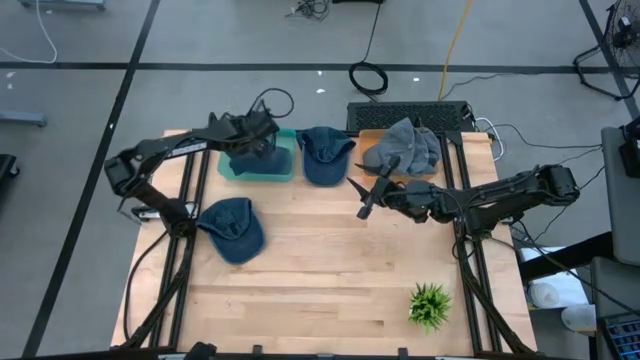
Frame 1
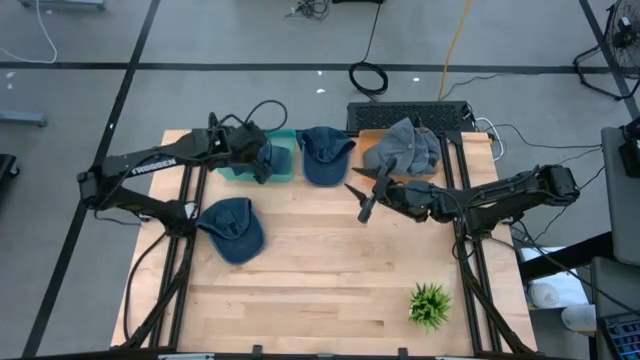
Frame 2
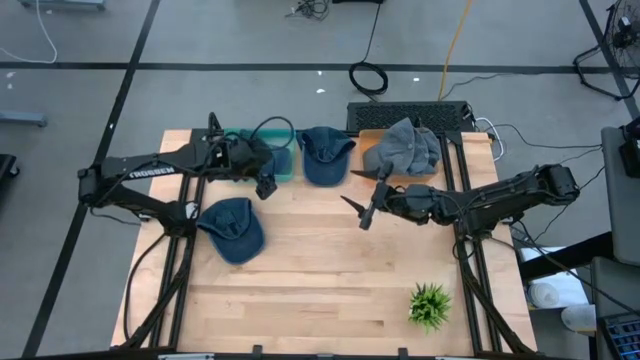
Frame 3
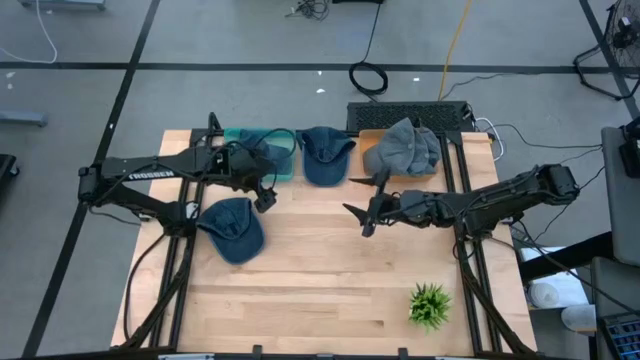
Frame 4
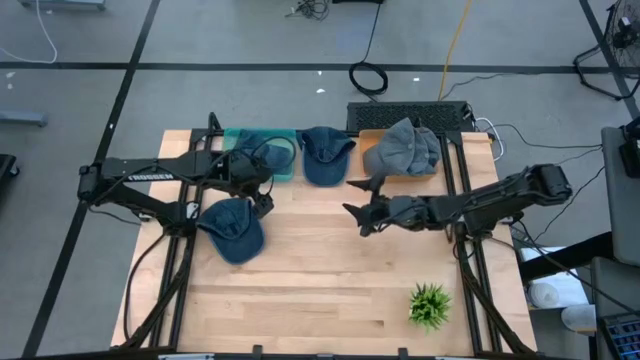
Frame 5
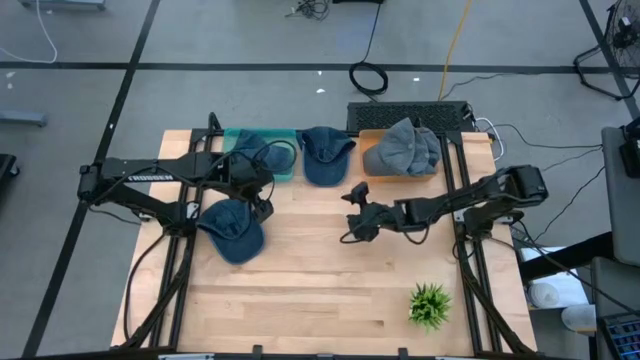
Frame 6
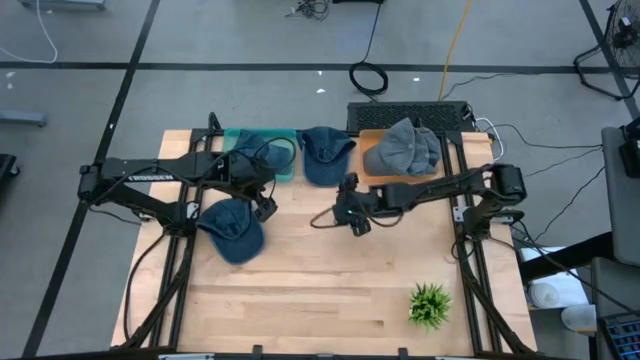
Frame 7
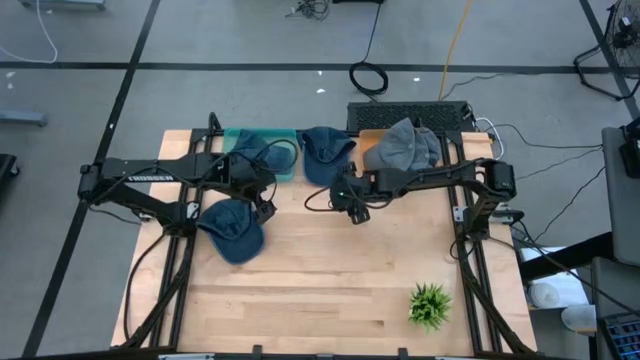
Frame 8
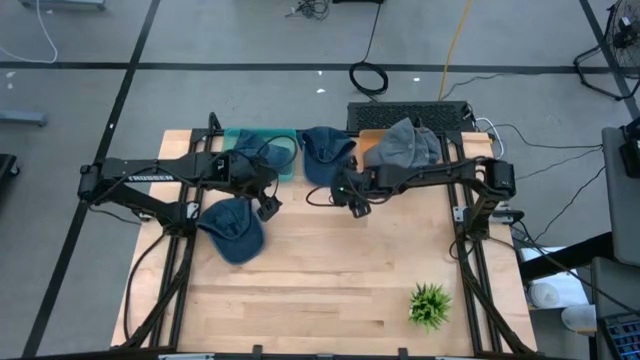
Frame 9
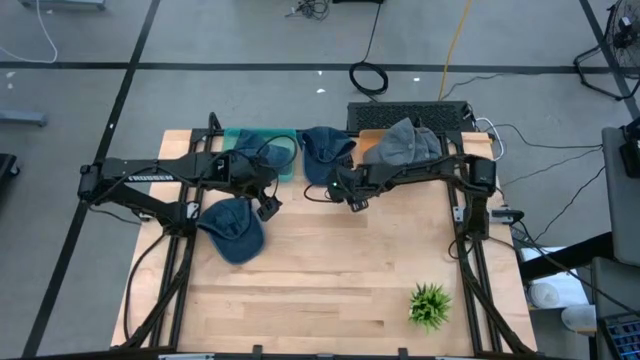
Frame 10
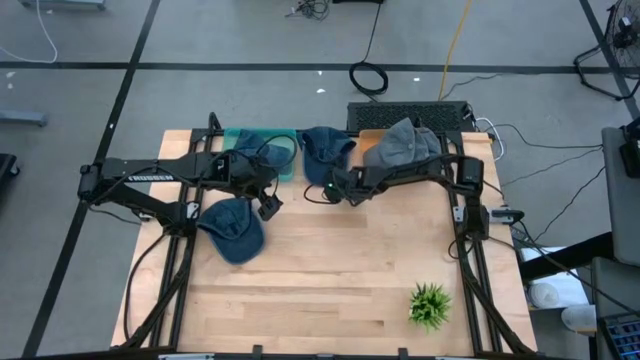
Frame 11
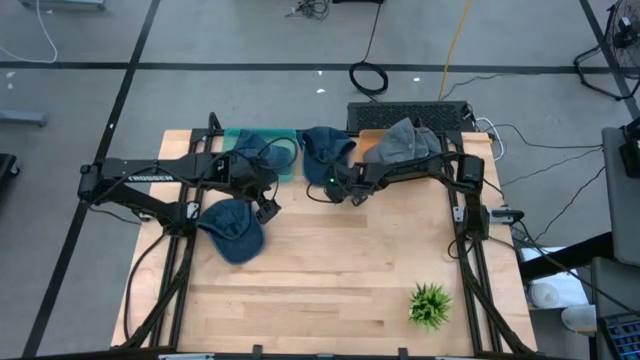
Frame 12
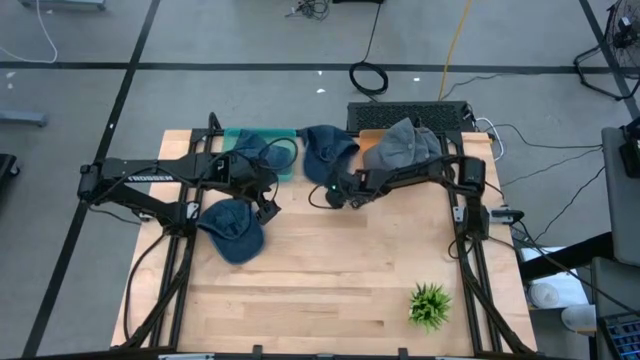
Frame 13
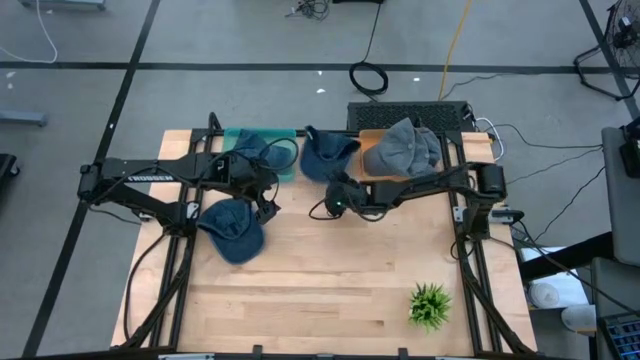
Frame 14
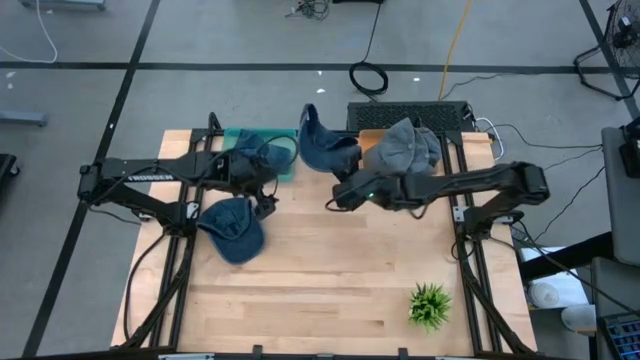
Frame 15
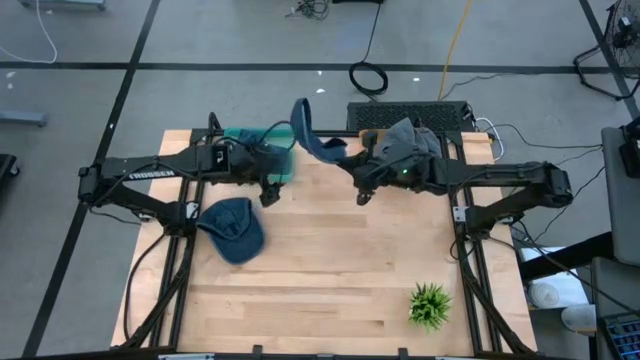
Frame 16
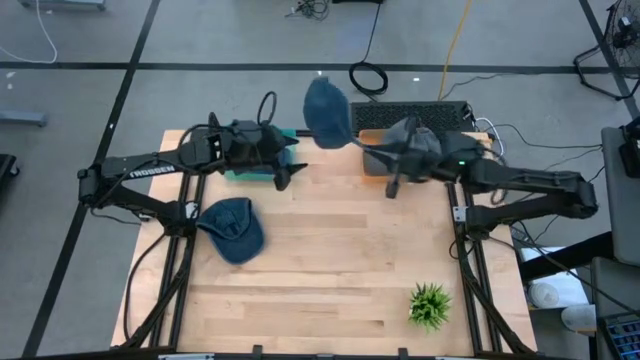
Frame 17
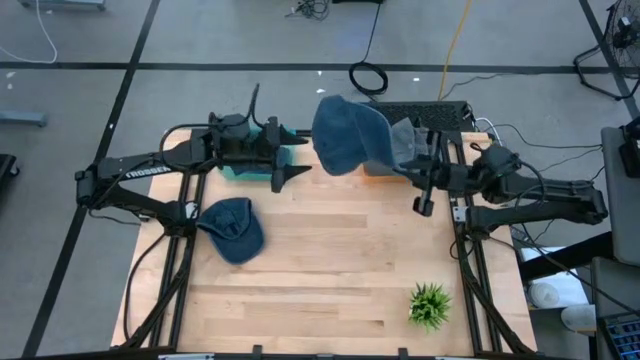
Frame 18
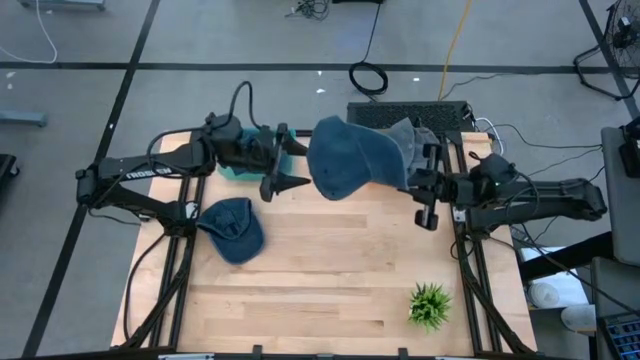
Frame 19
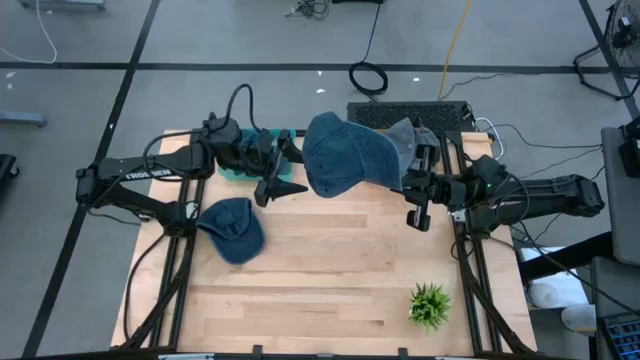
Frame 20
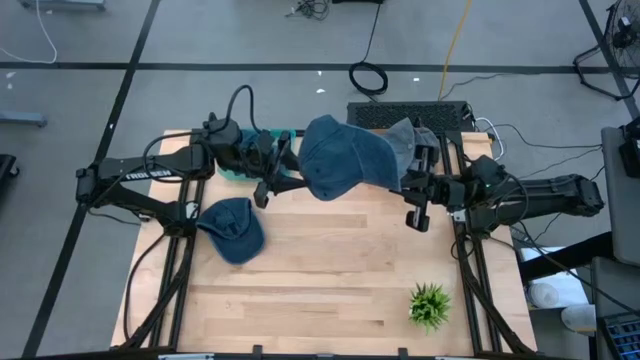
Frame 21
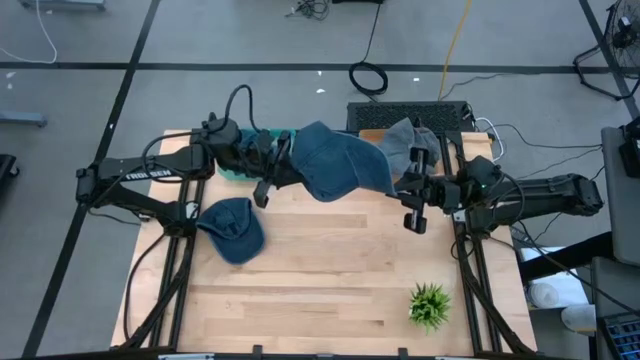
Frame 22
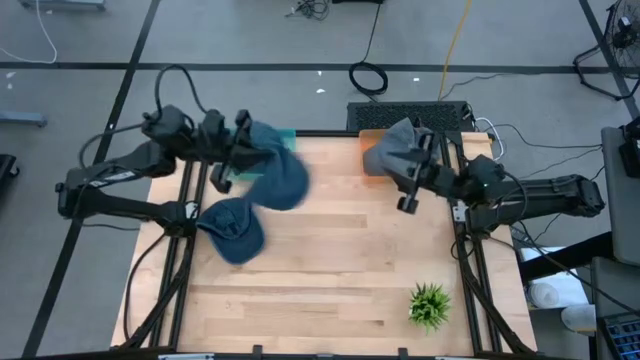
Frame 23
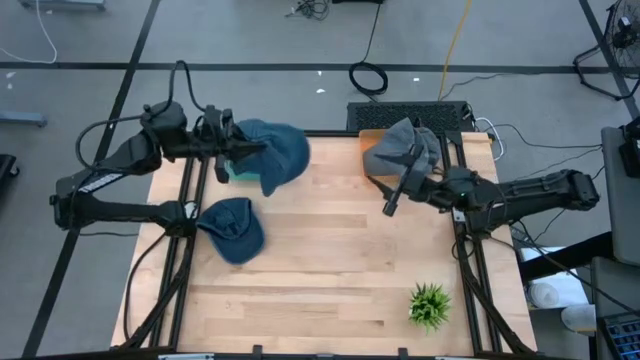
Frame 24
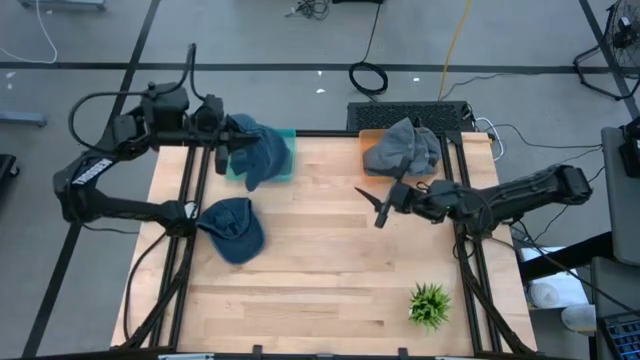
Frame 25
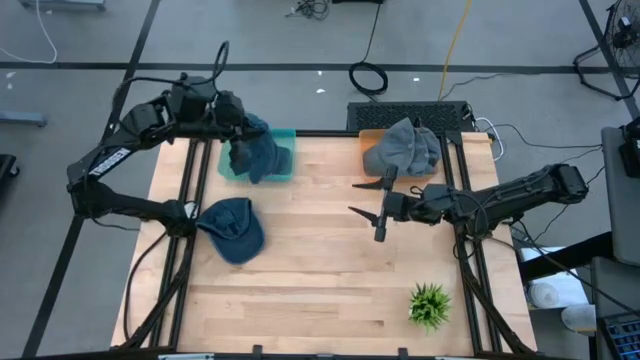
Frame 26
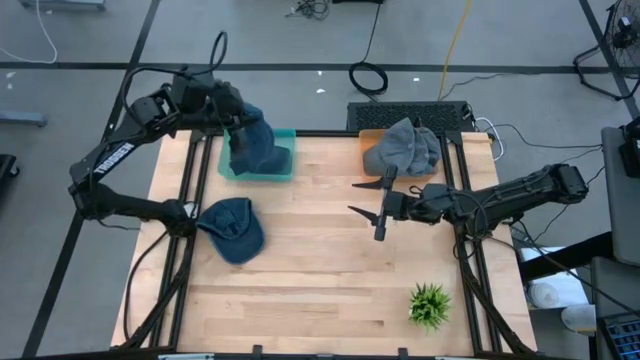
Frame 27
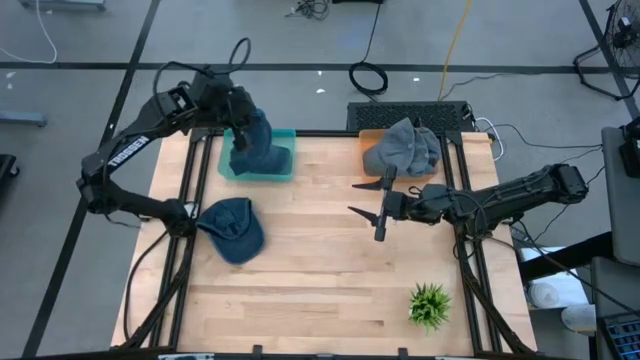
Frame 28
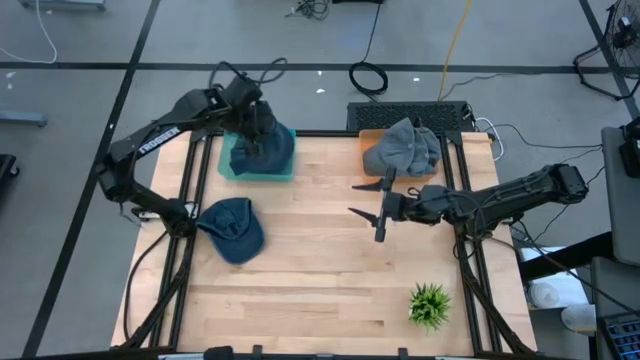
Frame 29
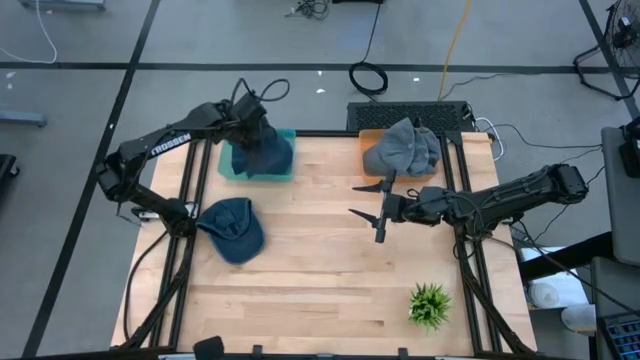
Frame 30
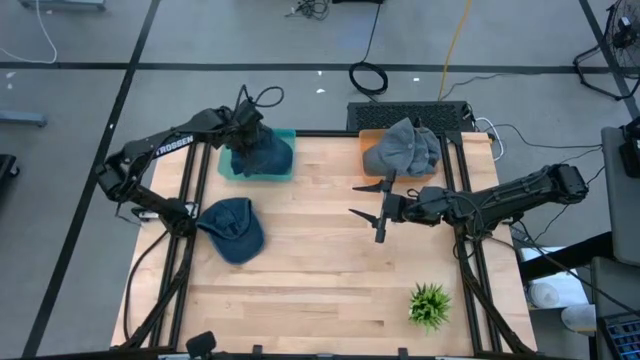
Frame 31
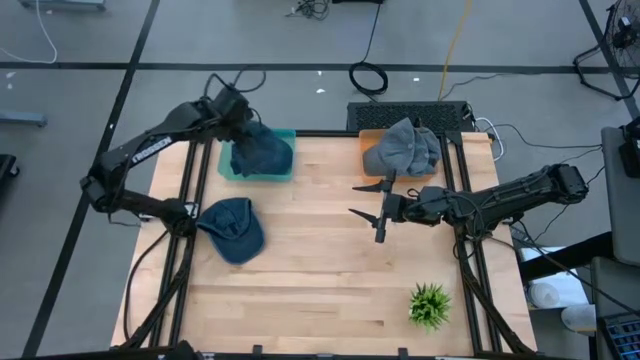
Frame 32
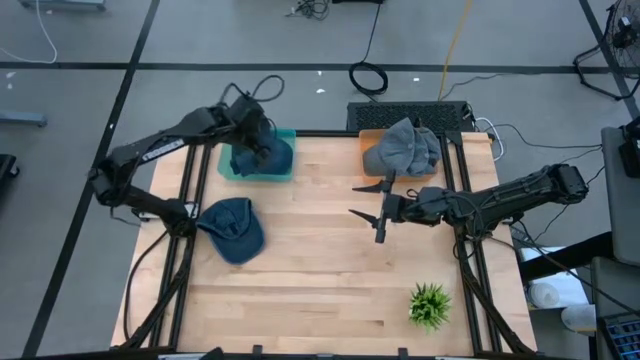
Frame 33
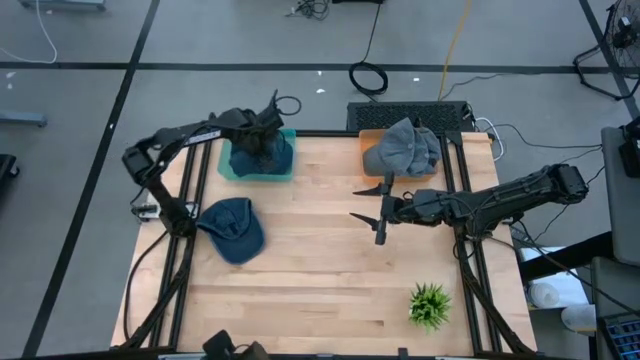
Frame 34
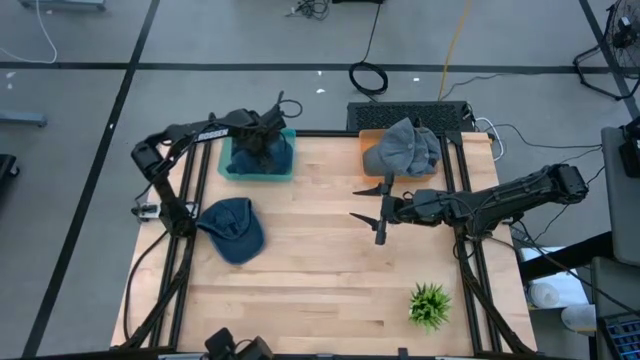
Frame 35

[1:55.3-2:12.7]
Task: Pick & Place hat
Put the top dark blue cap into the blue bin

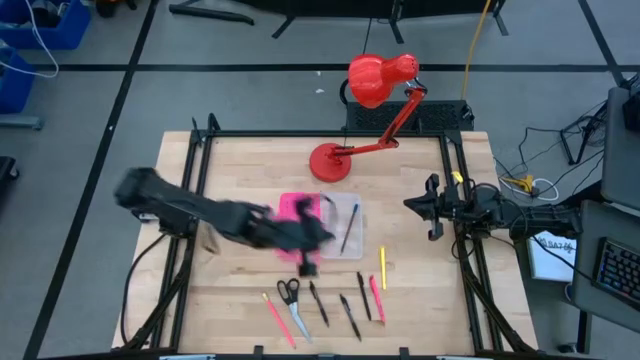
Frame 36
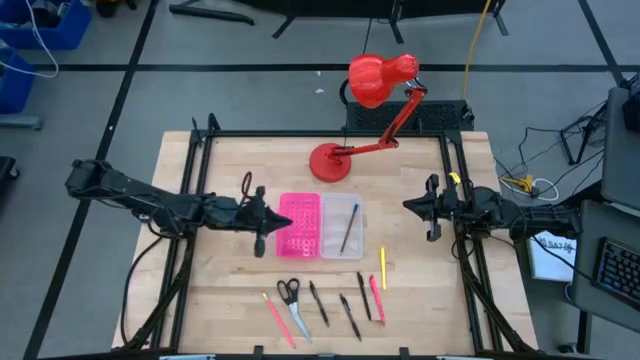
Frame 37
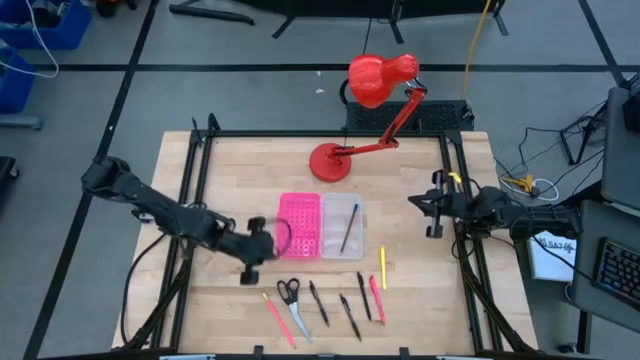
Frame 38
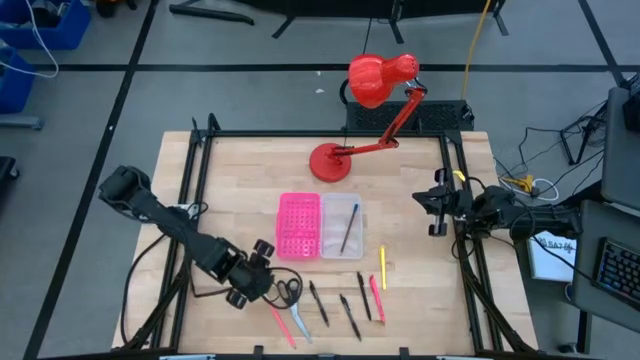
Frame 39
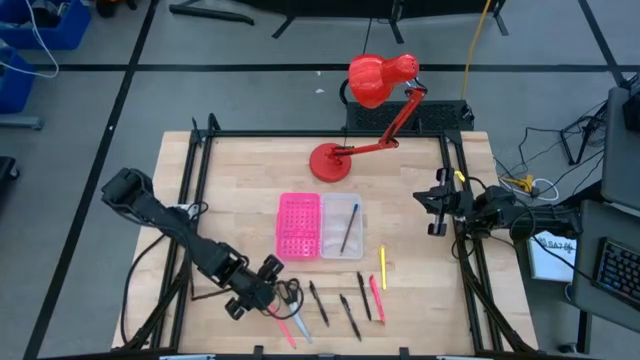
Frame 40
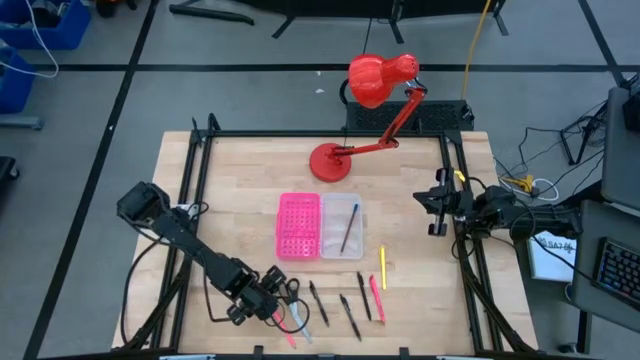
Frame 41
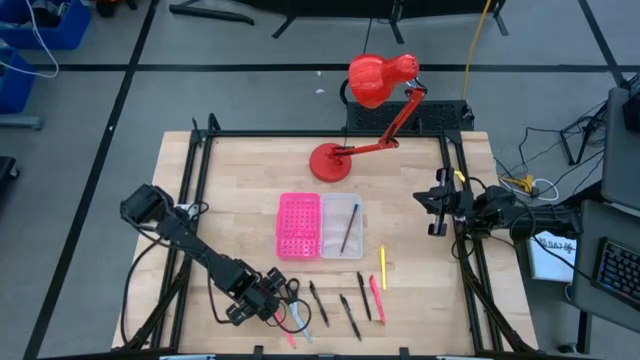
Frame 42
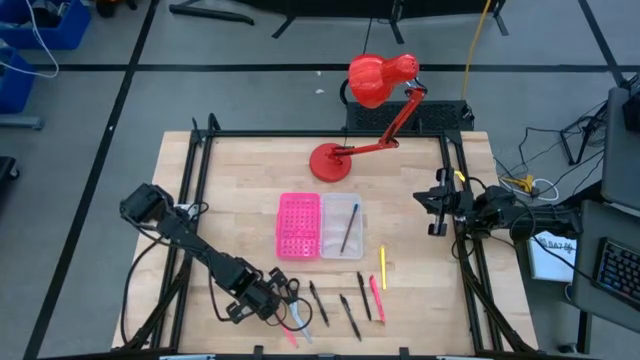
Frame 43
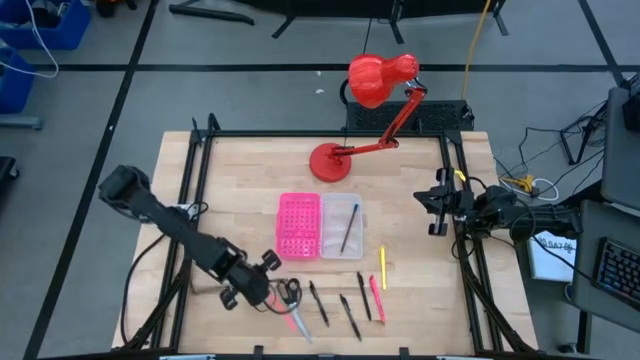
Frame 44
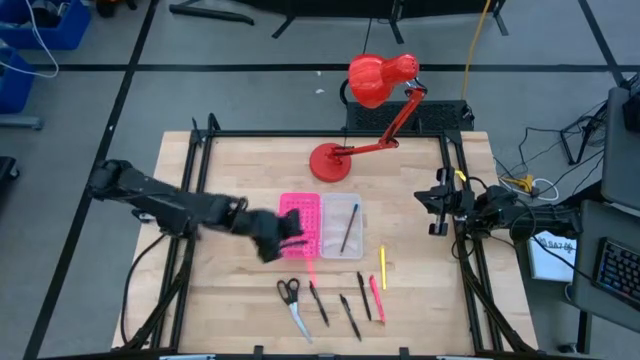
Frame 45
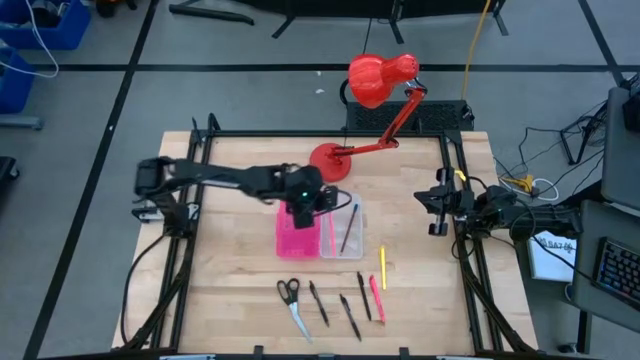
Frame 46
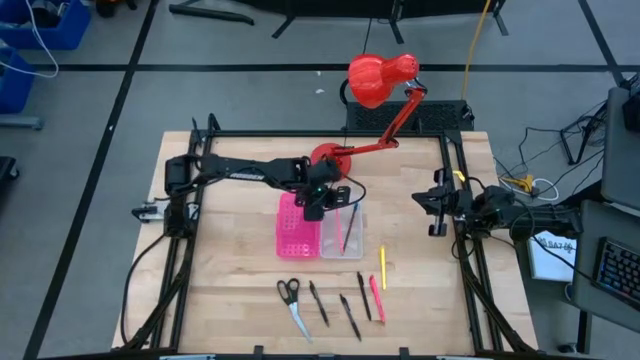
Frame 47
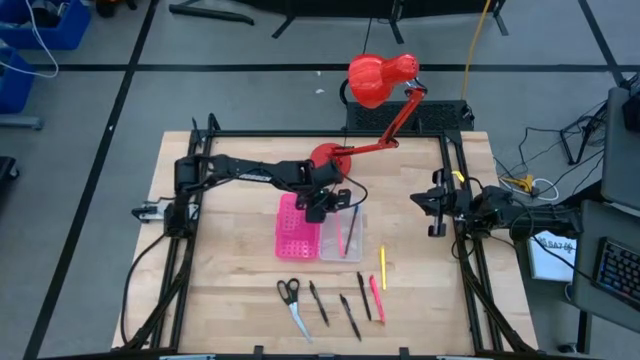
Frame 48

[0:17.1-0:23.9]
Task: Pick & place school supplies into a supply box
Put the pink pencil into the pink supply box
